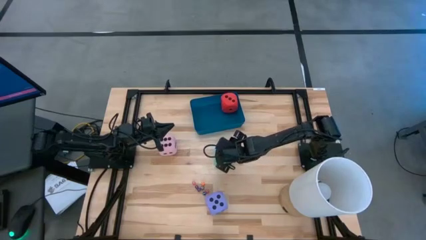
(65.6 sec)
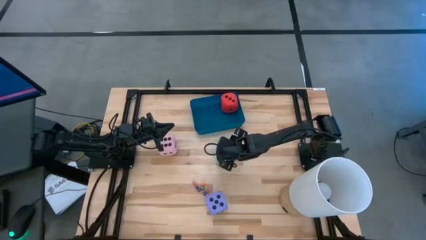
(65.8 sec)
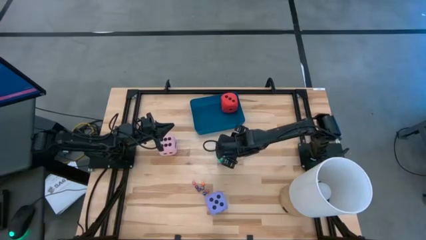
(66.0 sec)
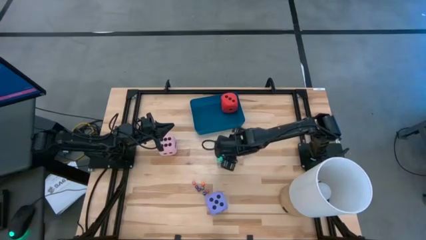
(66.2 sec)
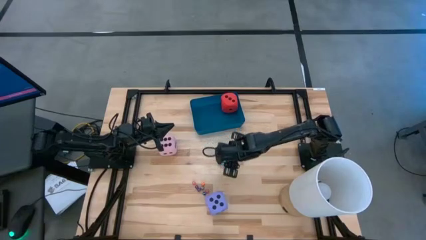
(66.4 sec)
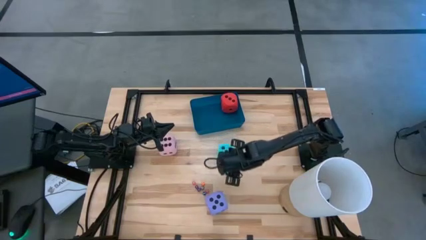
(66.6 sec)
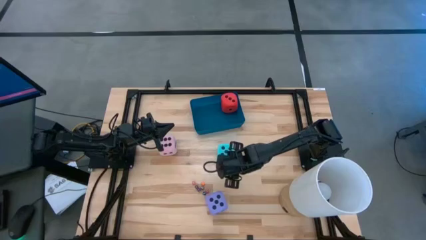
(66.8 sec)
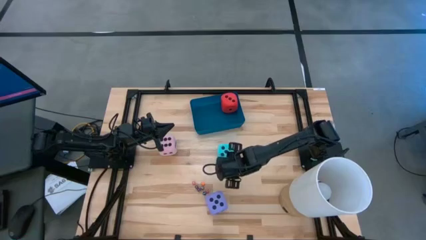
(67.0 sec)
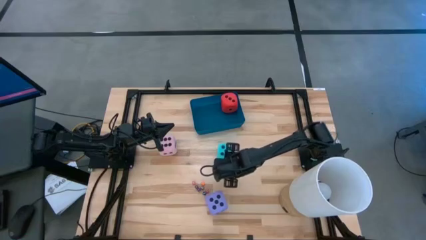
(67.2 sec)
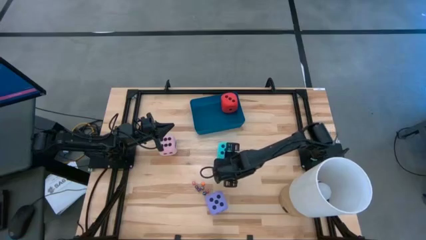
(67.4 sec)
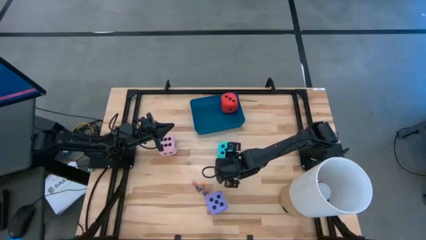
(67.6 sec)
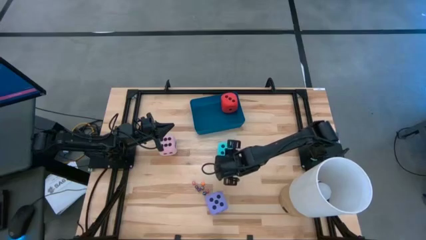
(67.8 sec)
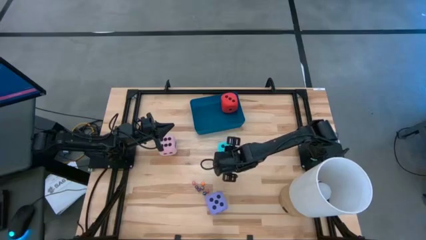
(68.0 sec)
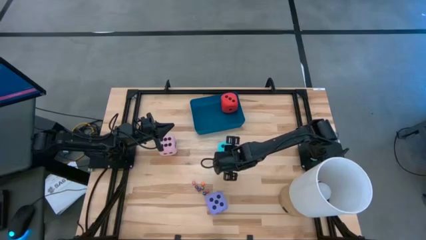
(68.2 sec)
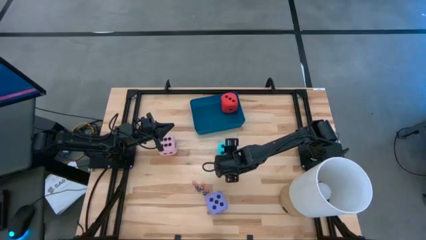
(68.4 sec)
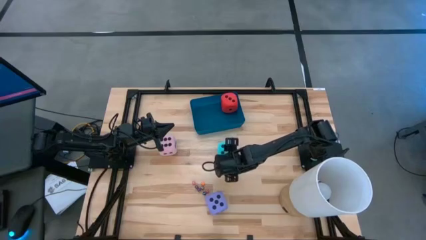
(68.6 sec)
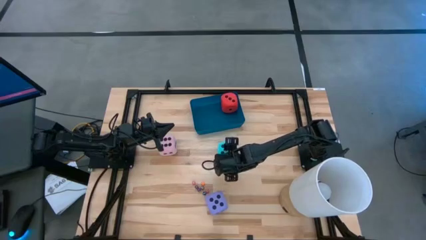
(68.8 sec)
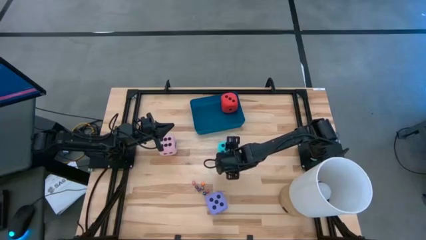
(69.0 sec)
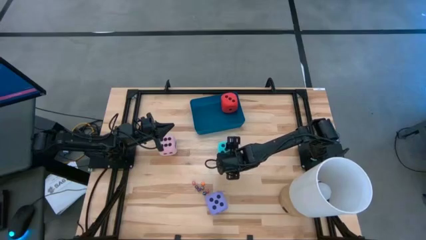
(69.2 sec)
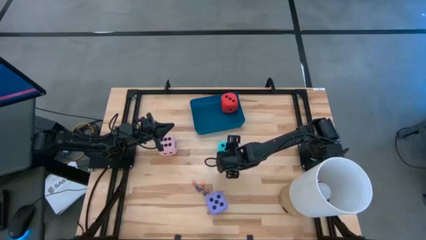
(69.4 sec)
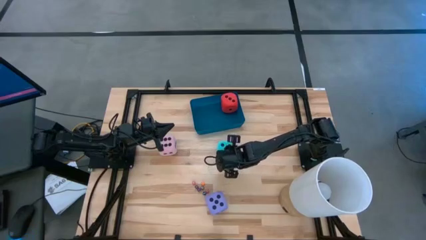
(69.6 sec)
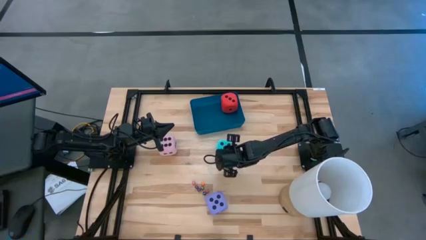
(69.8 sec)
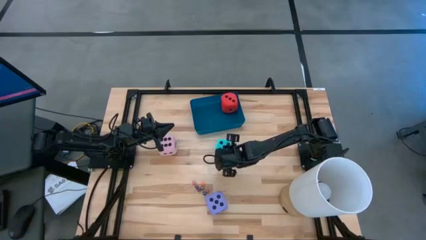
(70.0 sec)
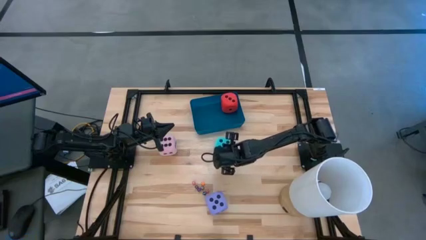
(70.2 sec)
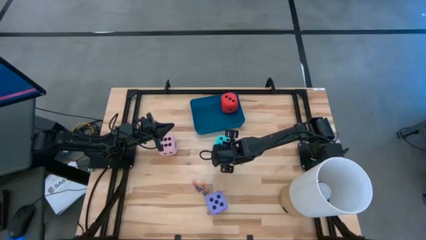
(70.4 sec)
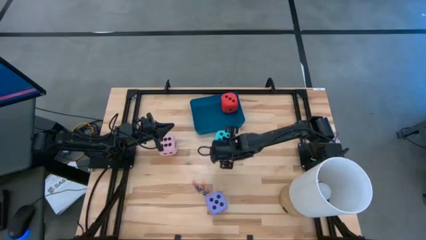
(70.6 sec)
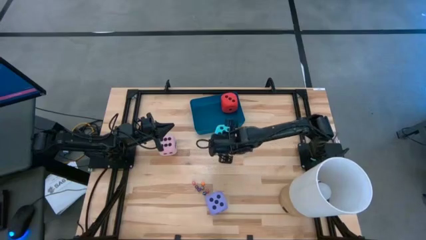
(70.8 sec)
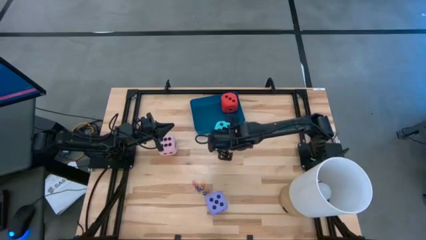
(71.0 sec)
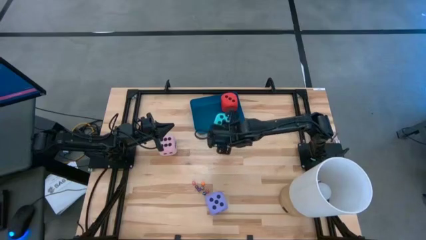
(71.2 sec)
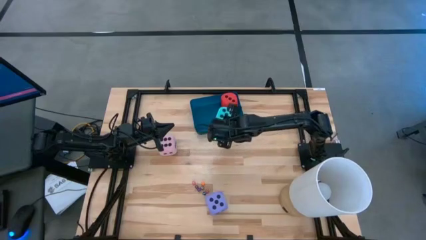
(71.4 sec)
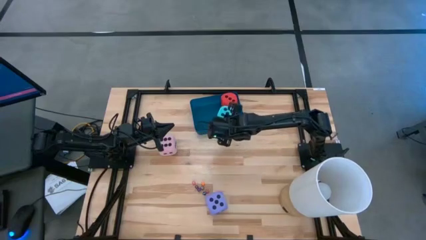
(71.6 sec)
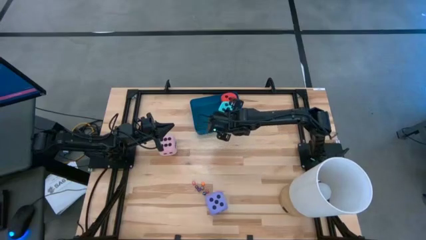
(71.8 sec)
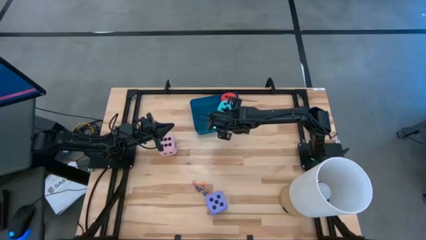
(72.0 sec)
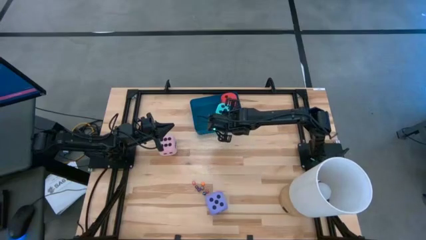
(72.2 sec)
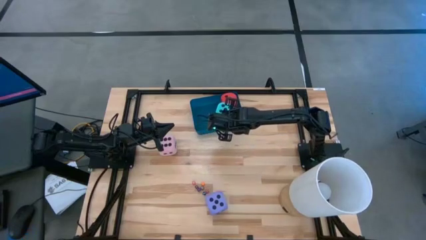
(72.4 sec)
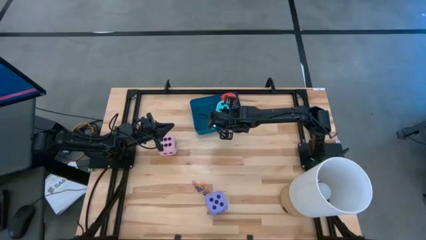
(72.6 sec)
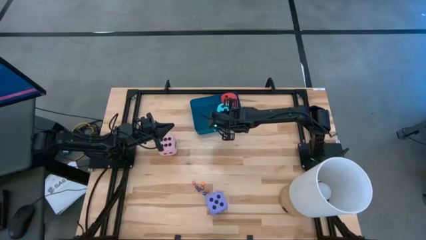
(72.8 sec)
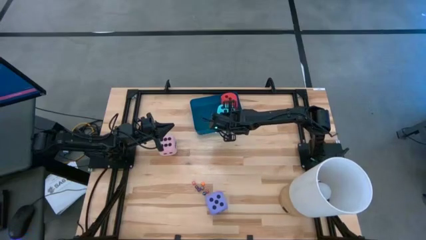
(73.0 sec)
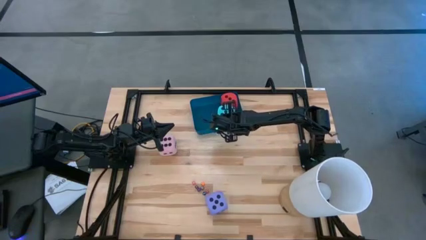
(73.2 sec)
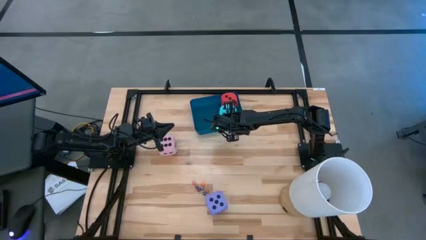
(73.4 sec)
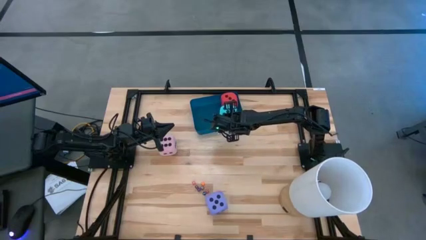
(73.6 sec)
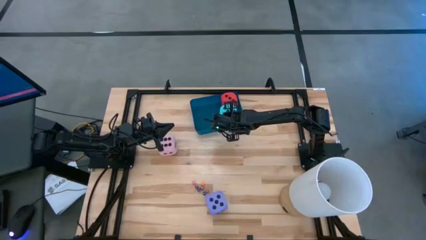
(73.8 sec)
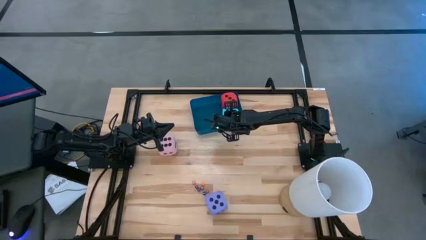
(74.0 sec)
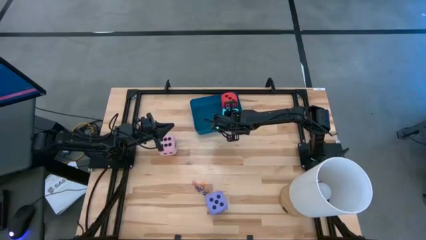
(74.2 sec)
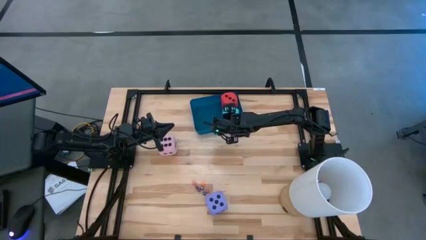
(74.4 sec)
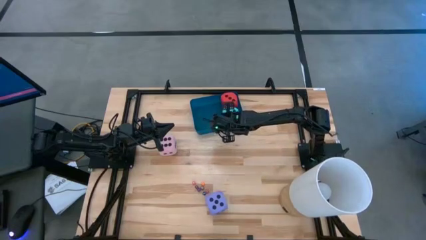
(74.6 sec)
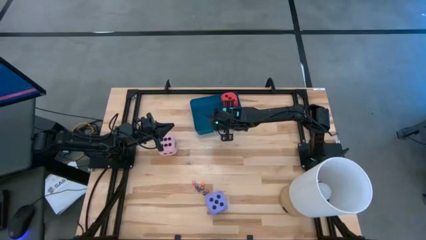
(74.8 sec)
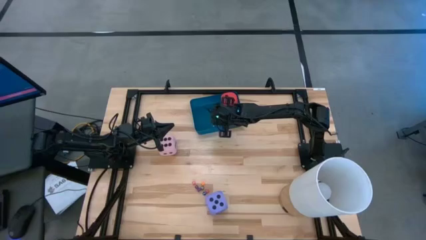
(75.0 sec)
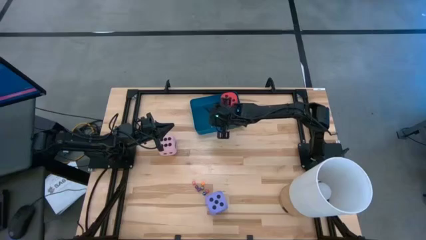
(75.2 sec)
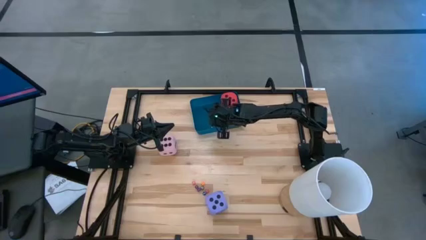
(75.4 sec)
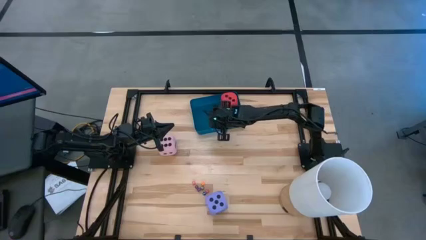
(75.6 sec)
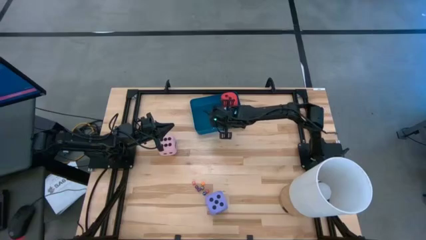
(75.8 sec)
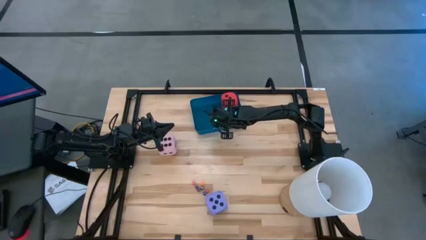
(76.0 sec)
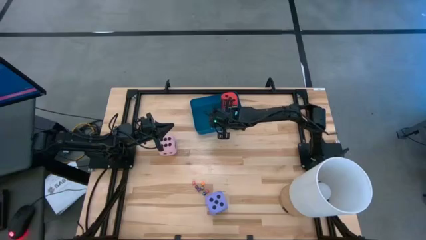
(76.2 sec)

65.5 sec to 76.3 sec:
Task: Pick & Place Dice
Put the large blue dice into the blue bin
